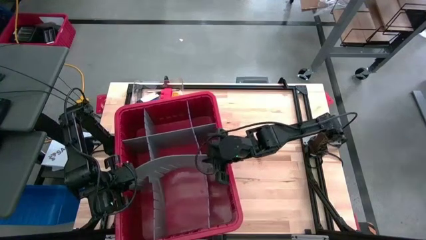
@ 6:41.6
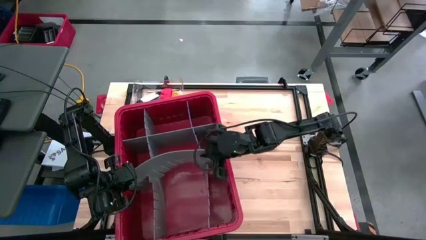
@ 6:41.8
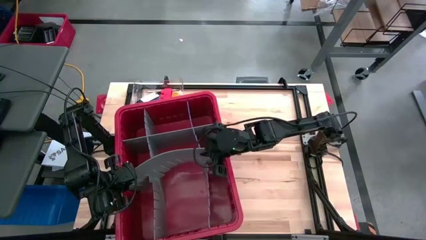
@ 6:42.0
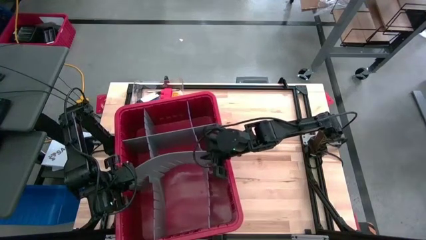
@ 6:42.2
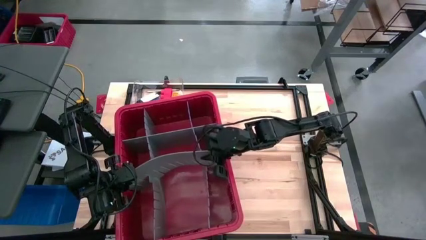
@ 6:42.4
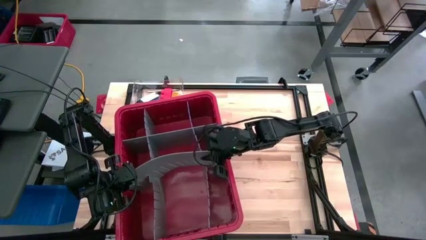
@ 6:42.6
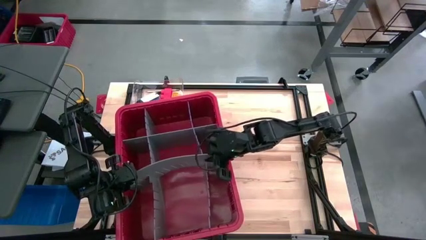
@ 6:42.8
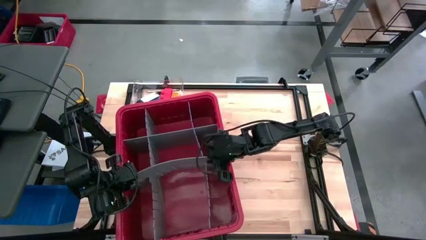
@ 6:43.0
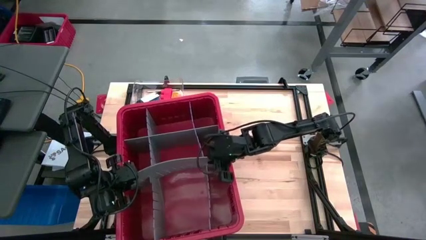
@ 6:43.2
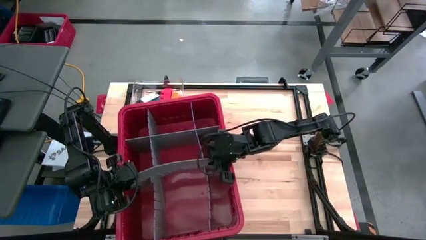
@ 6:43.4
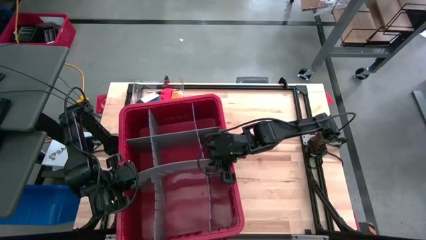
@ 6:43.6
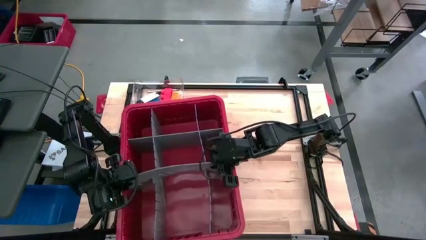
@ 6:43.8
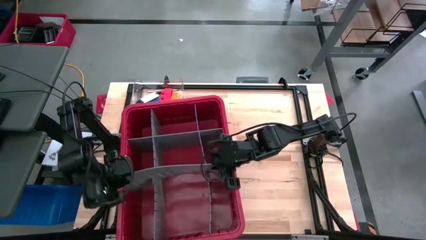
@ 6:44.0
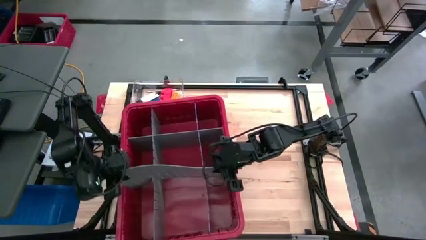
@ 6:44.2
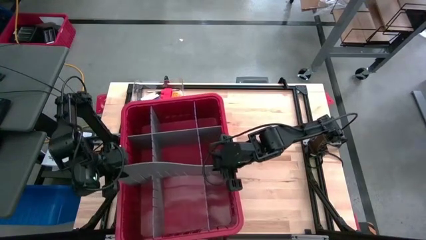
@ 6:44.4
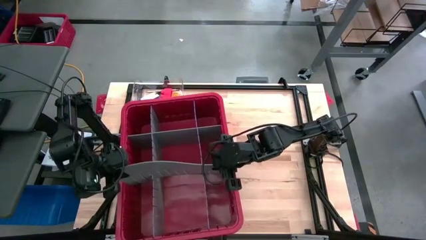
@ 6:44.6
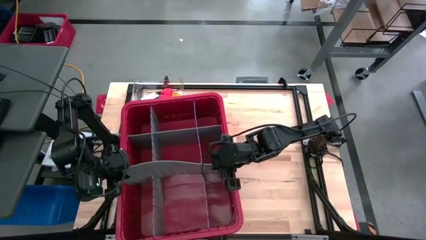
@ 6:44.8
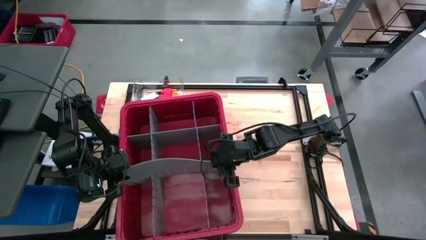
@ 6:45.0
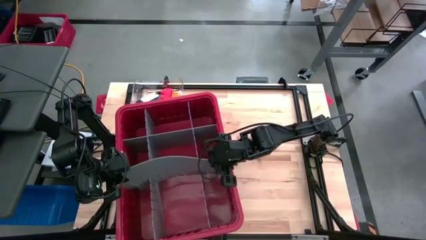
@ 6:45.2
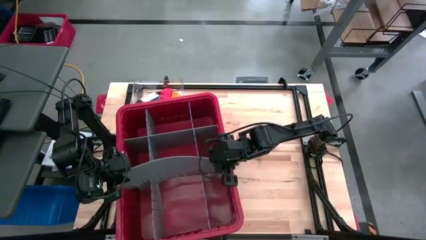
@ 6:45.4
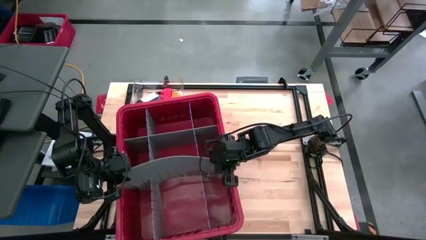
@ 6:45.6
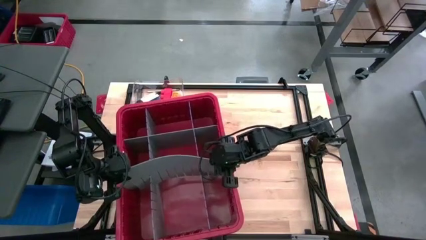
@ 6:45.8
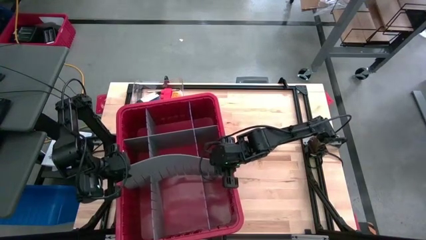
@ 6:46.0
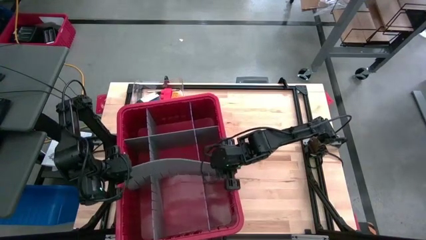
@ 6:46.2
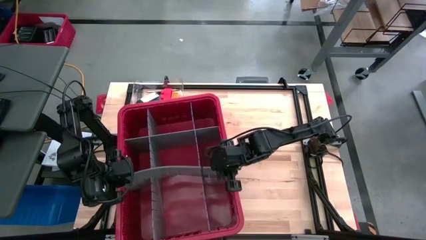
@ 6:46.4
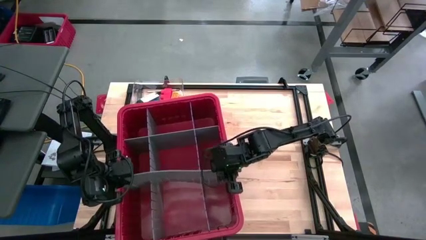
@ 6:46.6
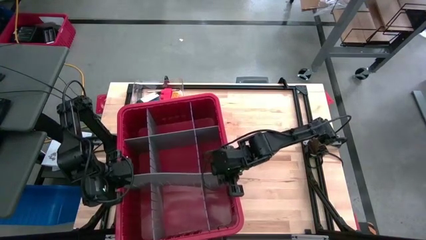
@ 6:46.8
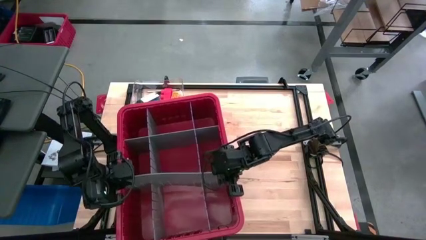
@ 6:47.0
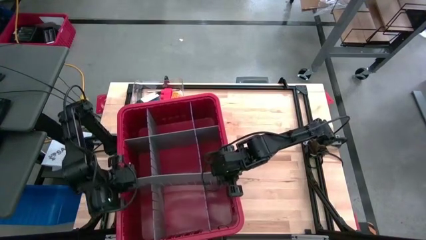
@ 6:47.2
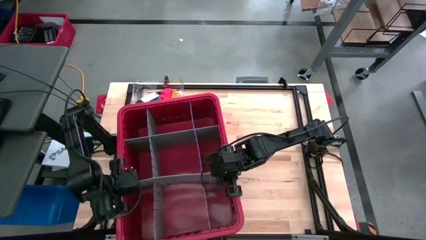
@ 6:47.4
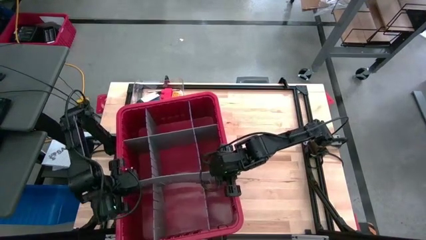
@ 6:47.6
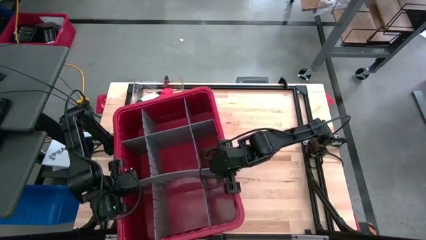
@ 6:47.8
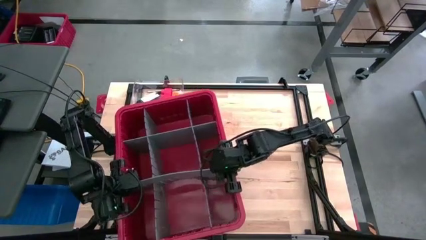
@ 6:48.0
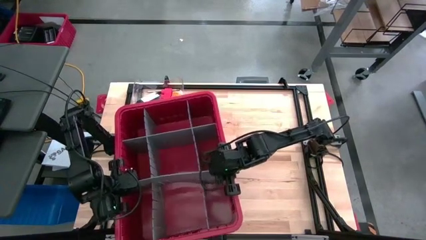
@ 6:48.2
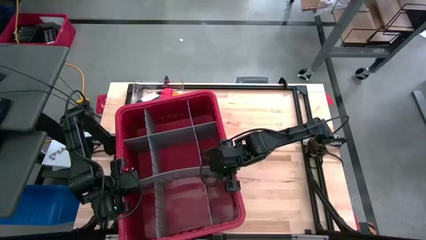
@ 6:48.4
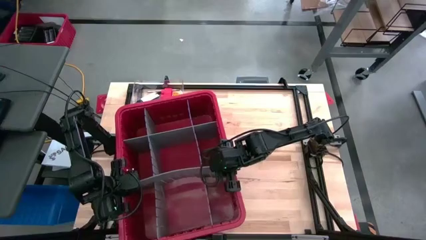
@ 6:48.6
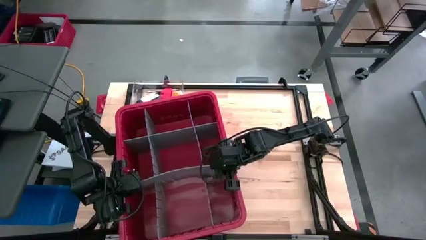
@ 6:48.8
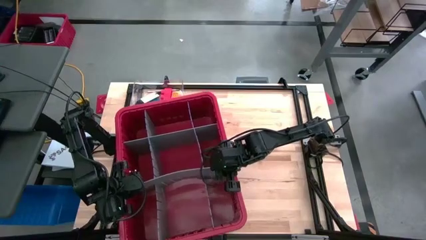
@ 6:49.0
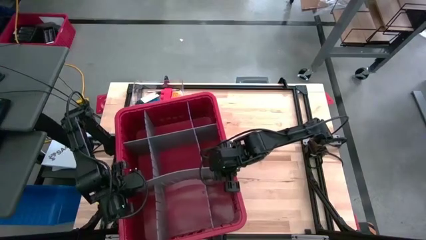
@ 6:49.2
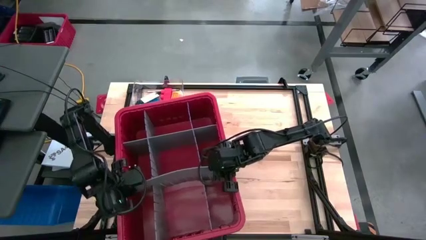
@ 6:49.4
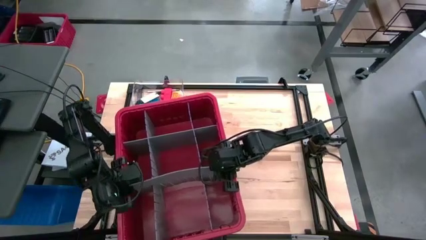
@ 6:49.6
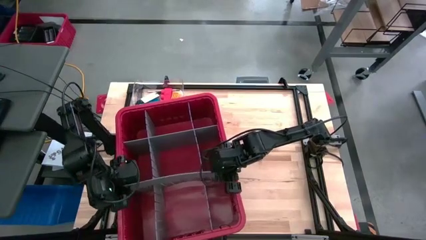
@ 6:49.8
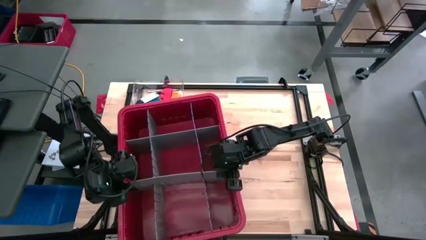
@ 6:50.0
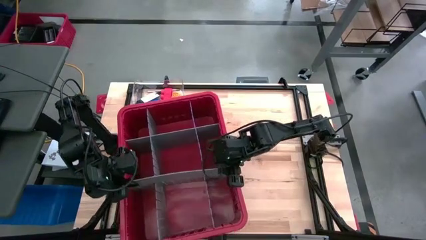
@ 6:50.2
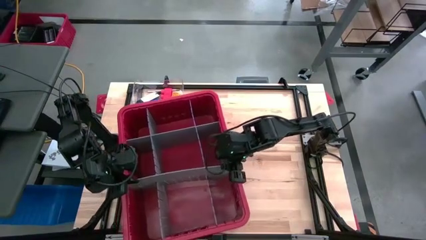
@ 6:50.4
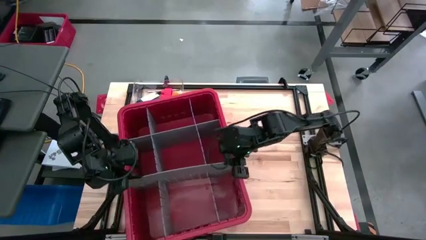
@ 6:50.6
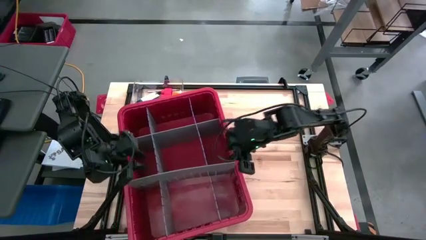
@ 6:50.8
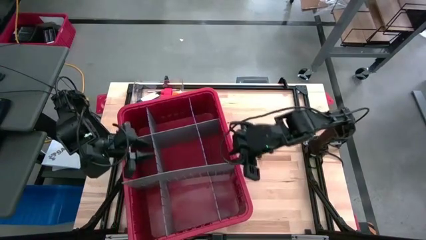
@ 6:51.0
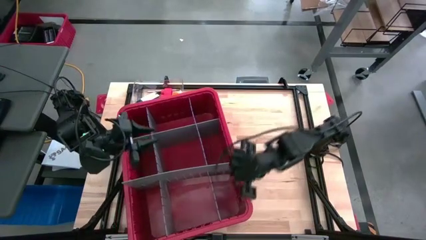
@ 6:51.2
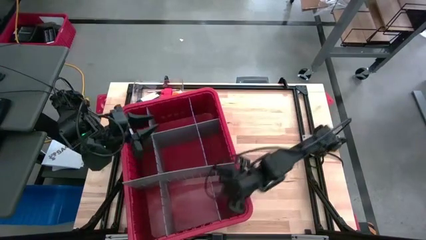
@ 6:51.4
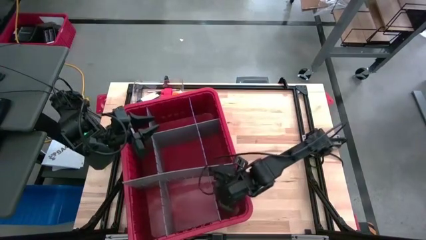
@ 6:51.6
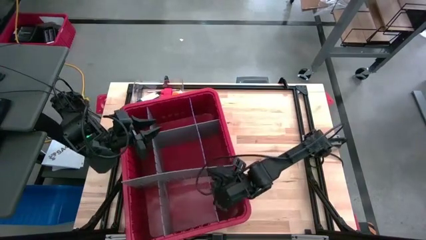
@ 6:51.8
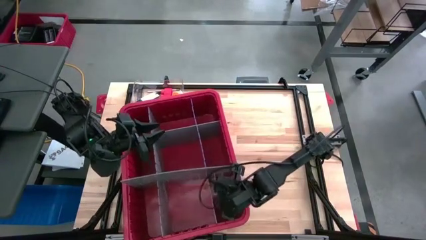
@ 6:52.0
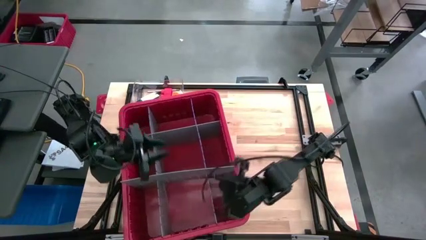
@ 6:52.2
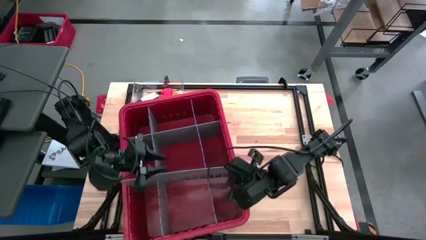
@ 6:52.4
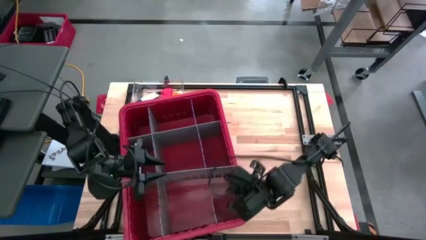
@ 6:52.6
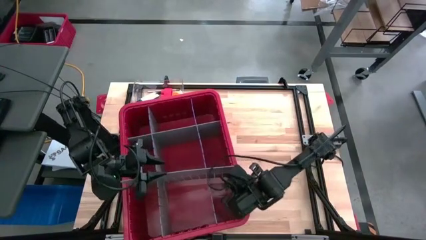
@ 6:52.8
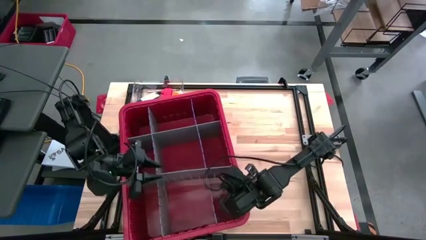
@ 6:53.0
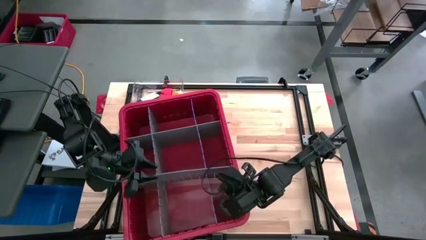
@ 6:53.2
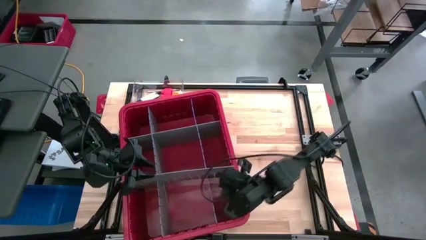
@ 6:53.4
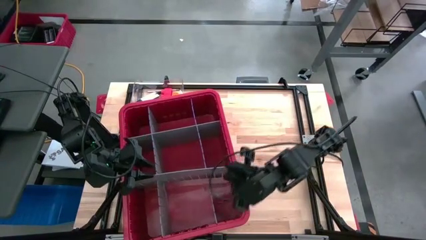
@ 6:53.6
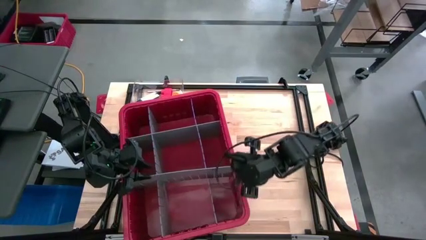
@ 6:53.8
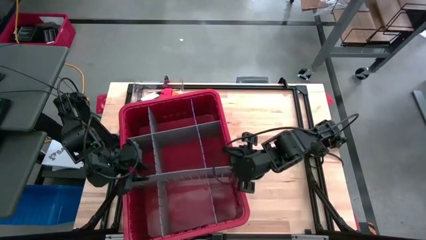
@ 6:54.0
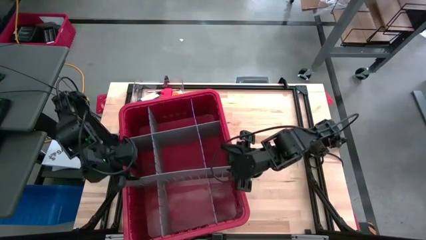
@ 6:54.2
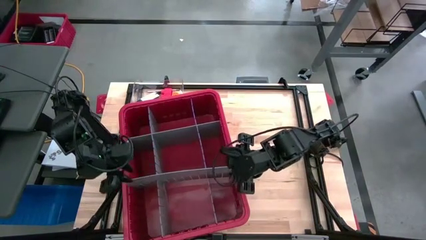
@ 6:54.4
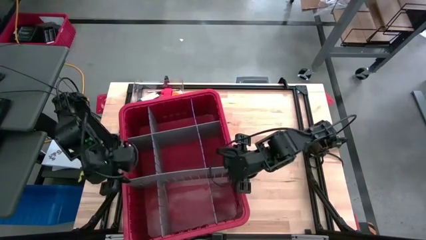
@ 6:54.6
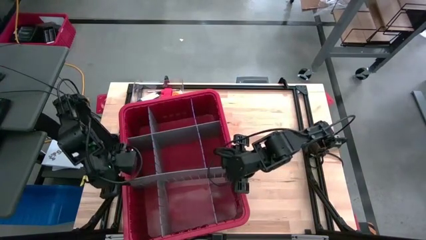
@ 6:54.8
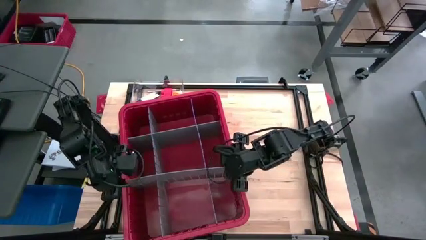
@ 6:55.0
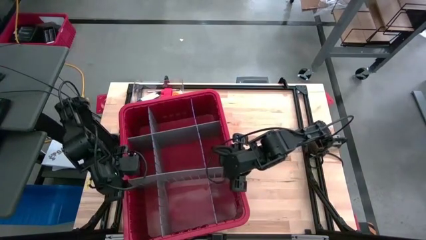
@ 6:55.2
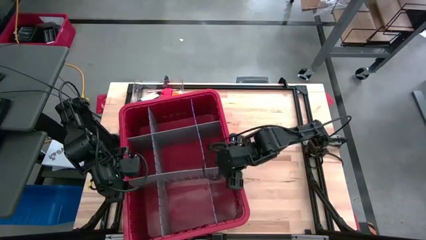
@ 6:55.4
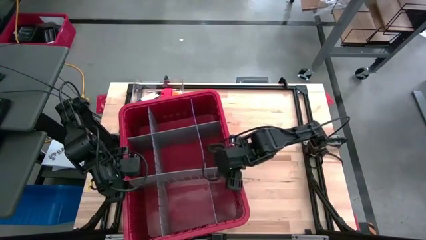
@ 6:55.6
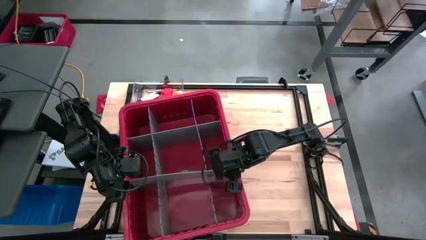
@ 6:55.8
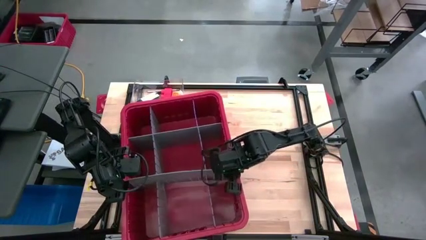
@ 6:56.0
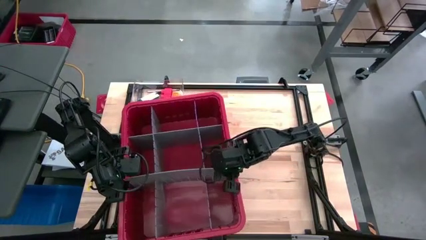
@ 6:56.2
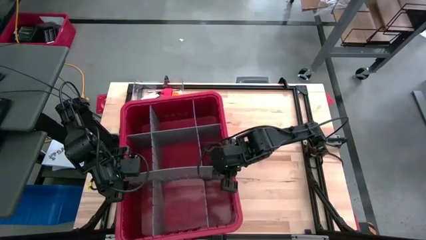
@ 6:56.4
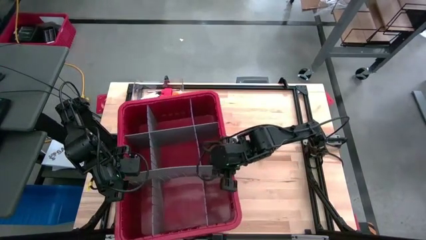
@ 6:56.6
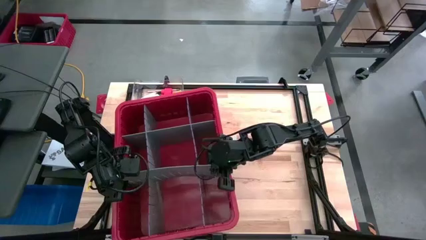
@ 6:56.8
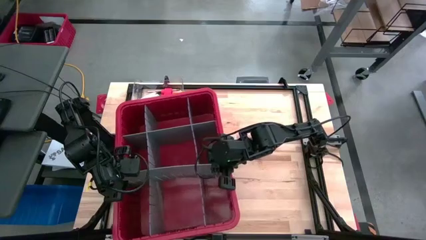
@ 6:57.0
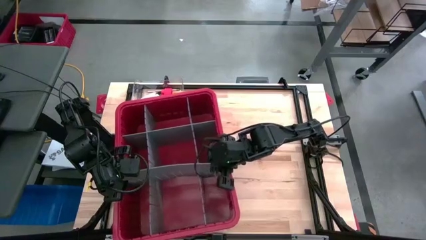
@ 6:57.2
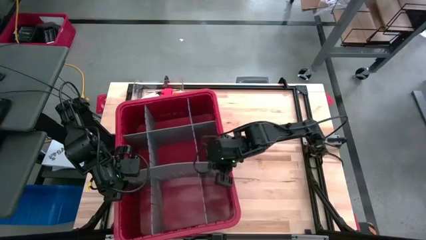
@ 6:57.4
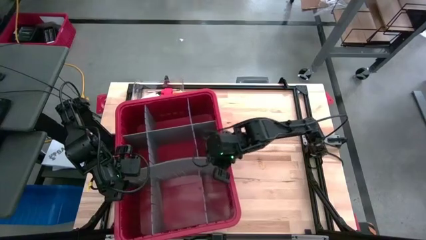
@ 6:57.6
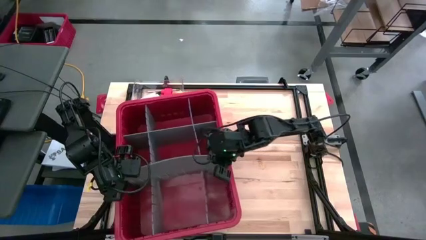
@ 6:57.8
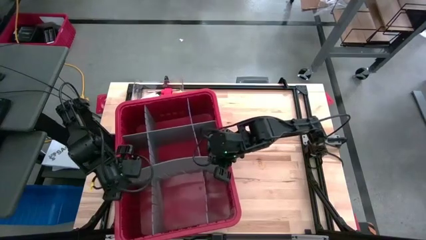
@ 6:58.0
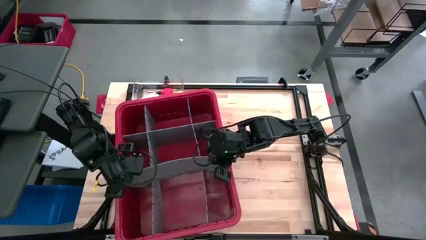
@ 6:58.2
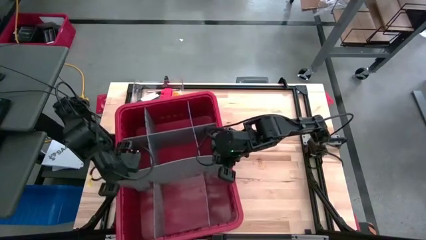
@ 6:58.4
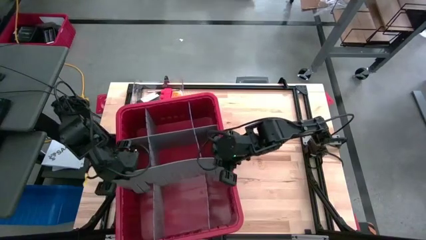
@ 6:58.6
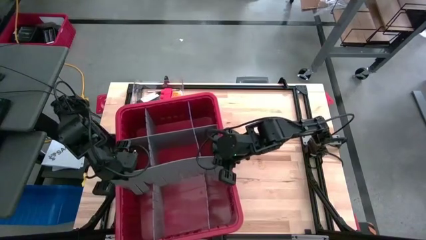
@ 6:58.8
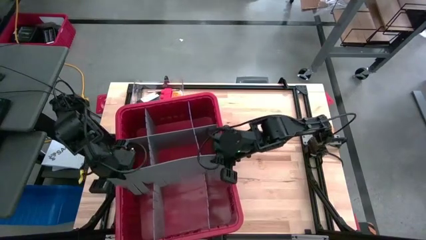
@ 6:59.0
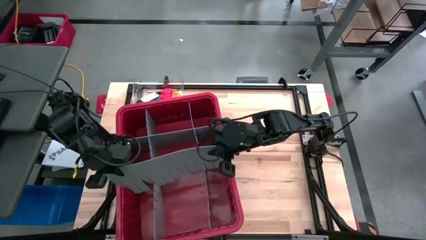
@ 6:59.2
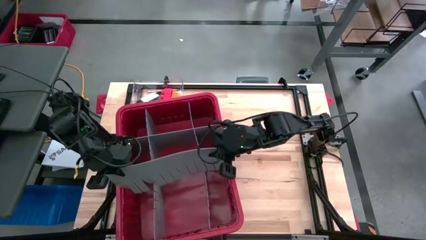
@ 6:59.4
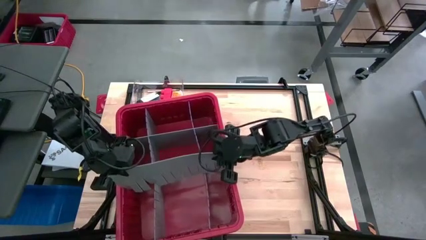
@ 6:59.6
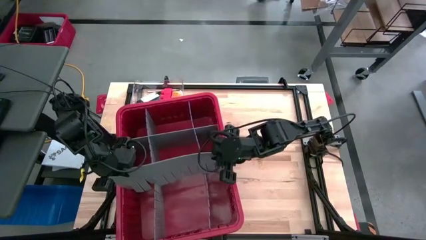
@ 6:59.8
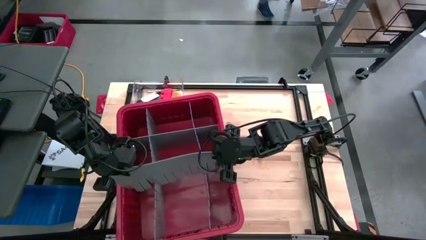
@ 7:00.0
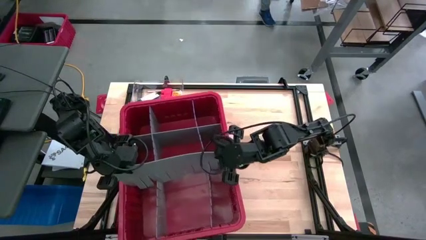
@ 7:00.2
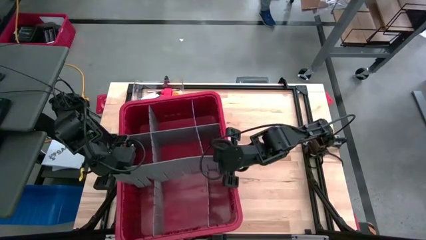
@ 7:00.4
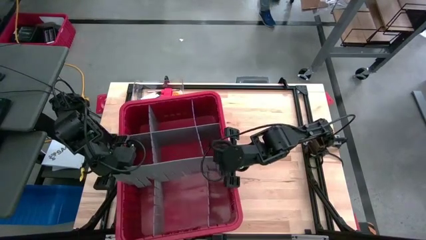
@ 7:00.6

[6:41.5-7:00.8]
Task: Sort blocks
Assemble the bin divider into the red bin
